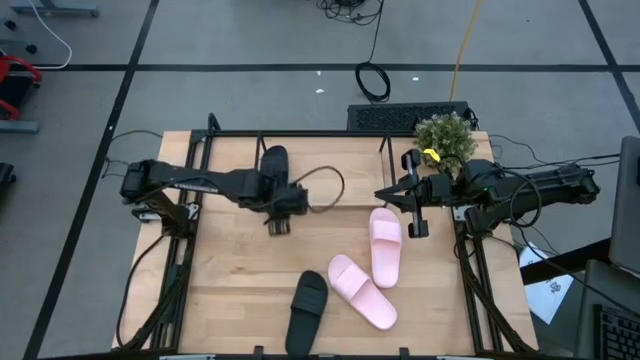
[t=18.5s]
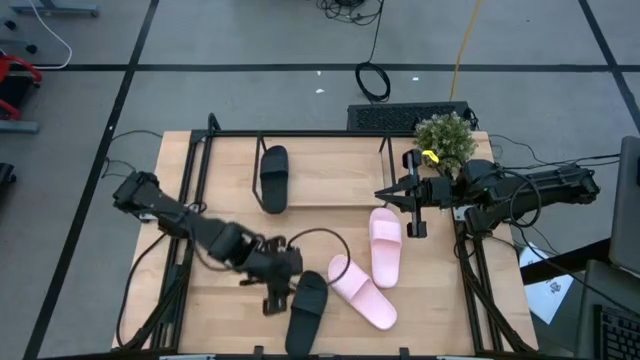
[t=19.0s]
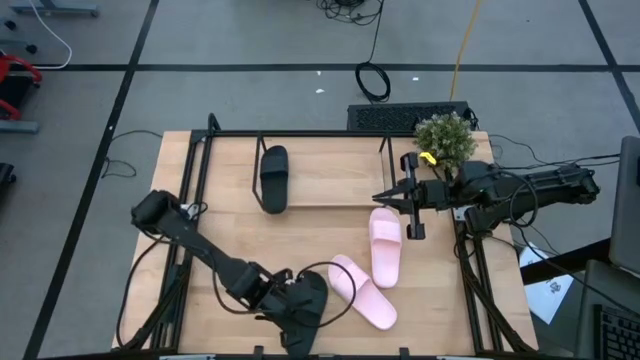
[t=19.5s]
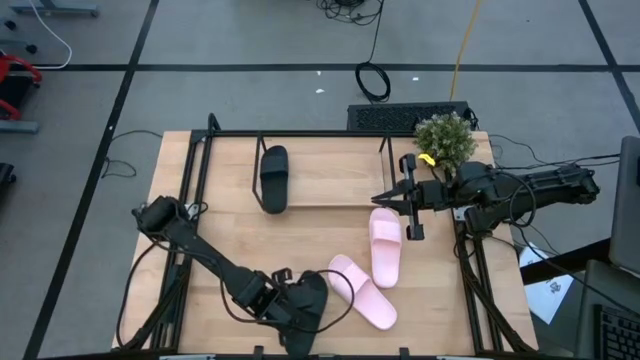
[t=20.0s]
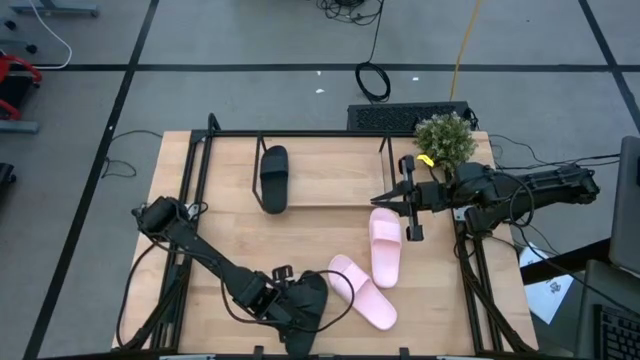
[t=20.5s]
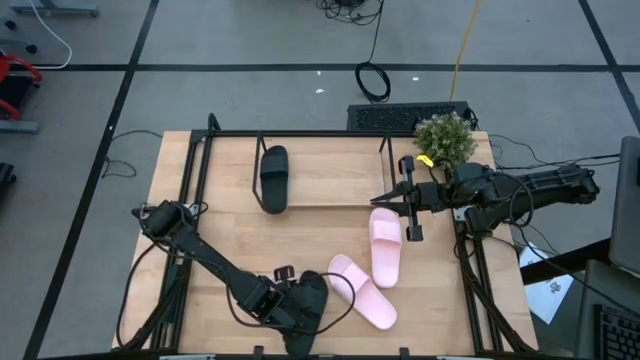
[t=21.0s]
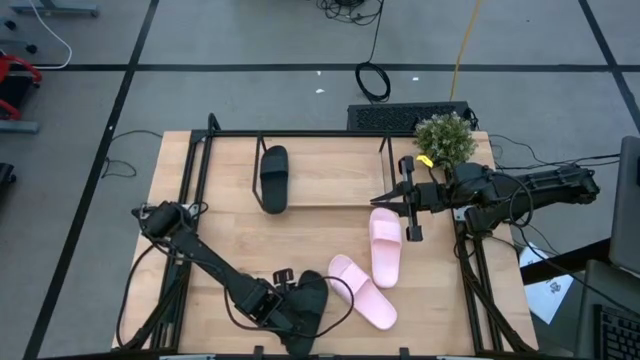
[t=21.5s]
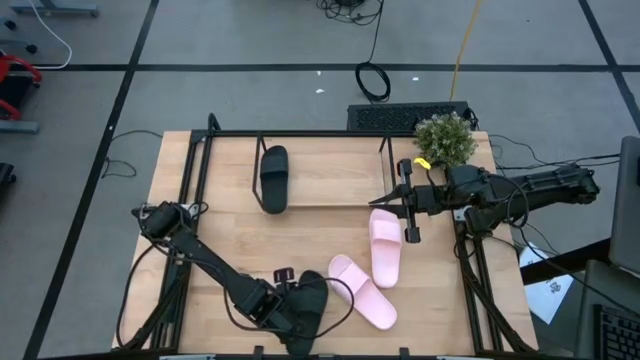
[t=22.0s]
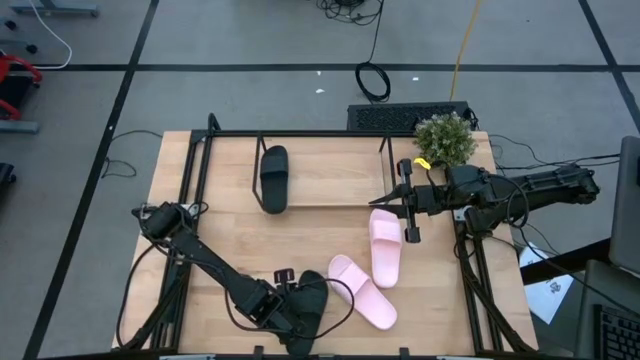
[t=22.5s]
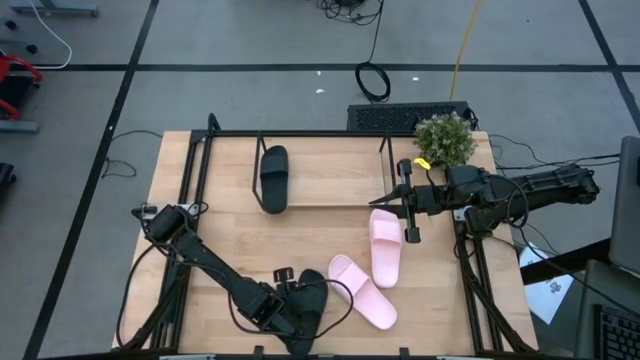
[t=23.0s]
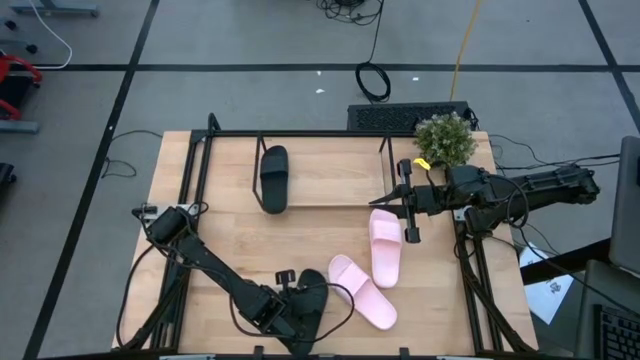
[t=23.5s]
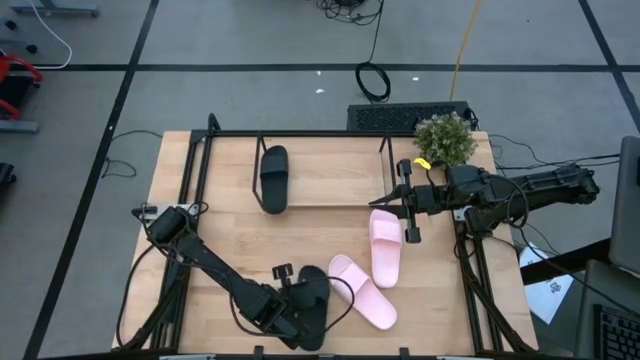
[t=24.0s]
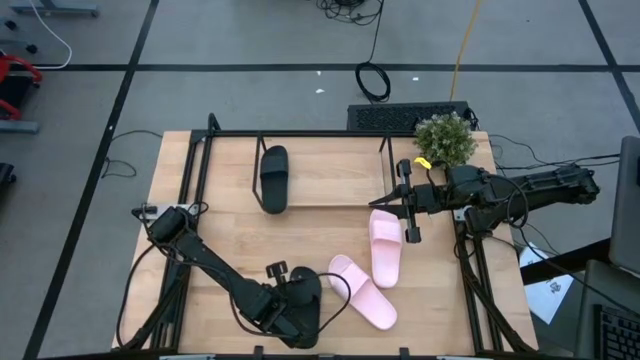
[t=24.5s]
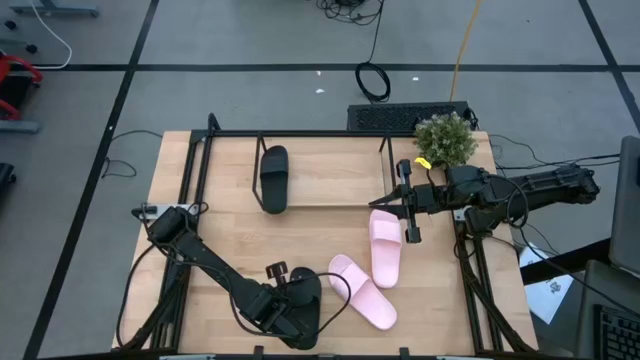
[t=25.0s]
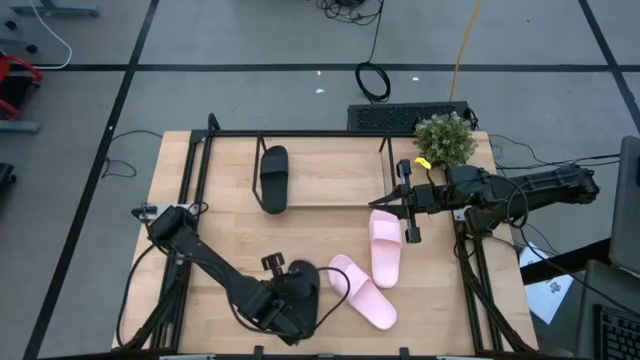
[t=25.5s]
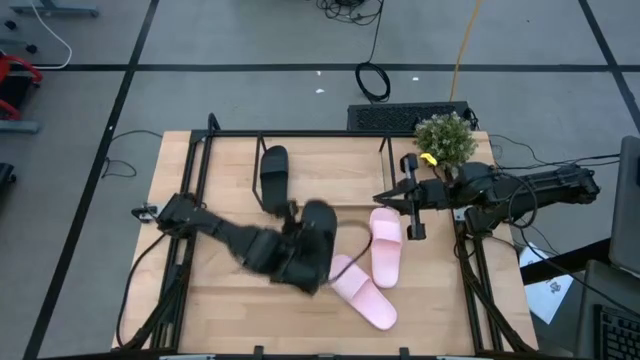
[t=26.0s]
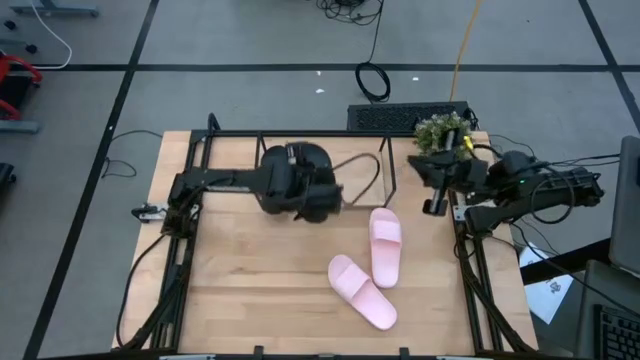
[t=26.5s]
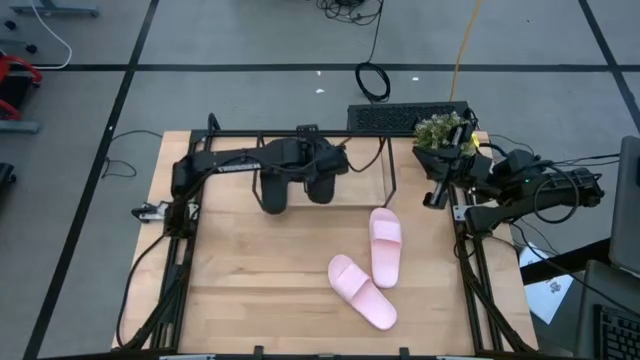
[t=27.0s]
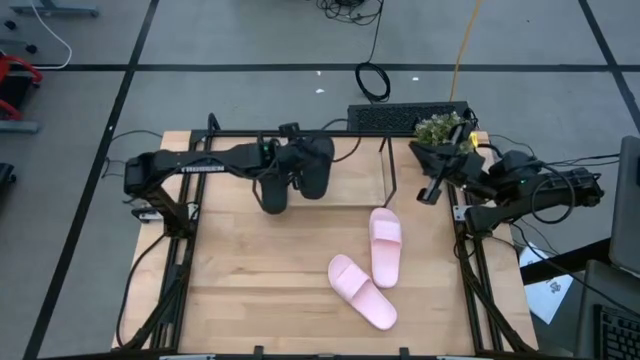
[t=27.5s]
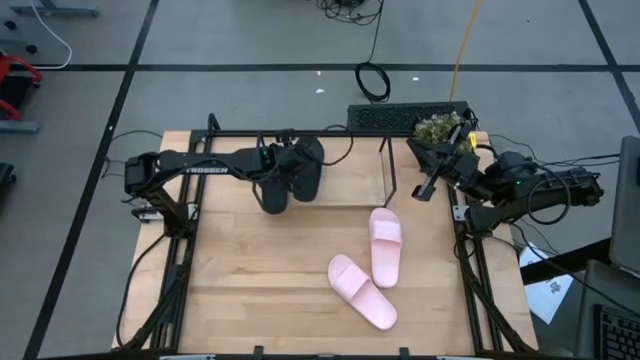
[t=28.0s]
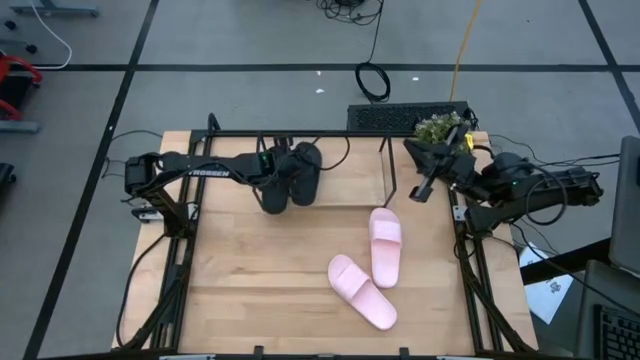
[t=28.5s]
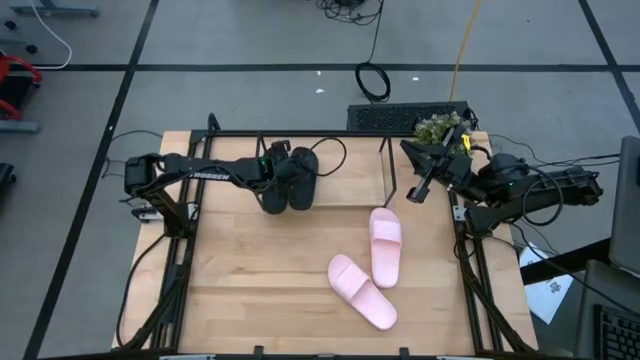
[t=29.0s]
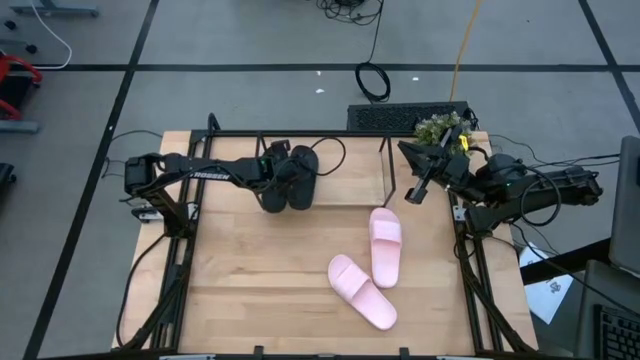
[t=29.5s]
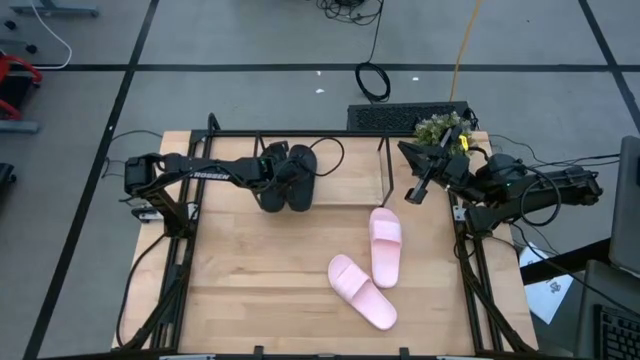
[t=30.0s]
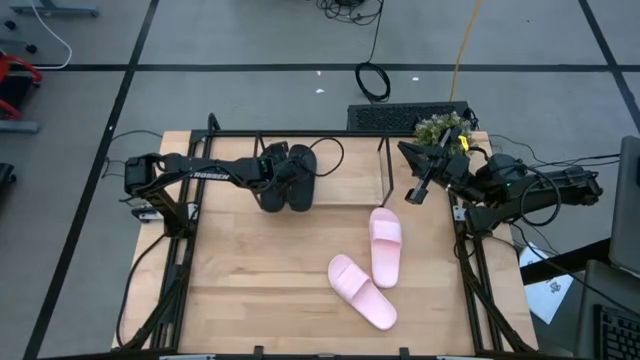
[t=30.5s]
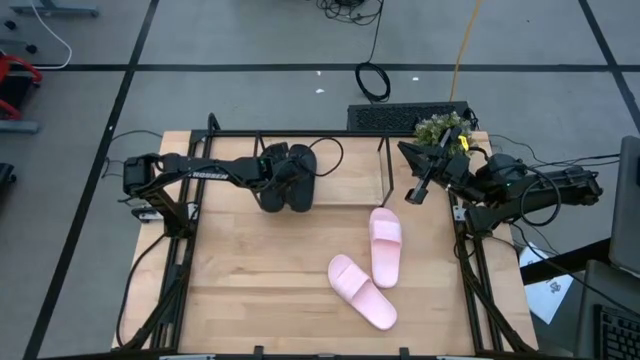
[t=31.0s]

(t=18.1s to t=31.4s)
Task: Pick and place slides into the shelf
Put the black slipper on the shelf

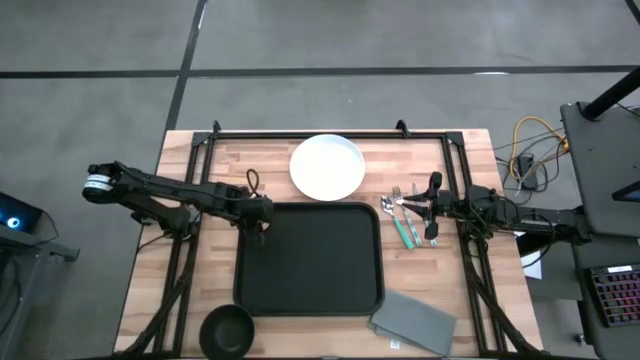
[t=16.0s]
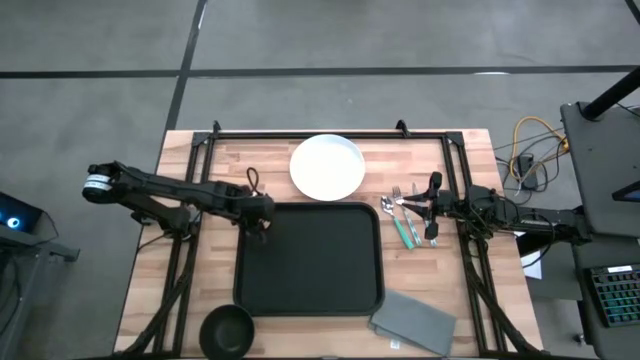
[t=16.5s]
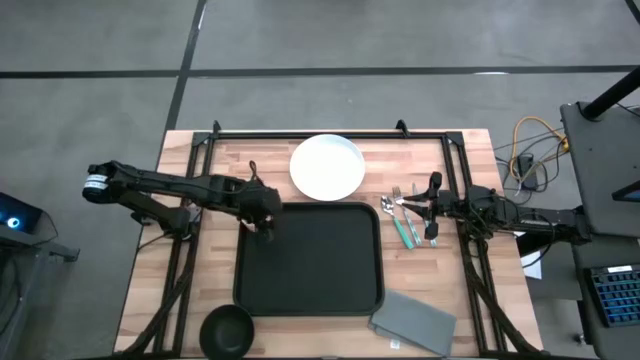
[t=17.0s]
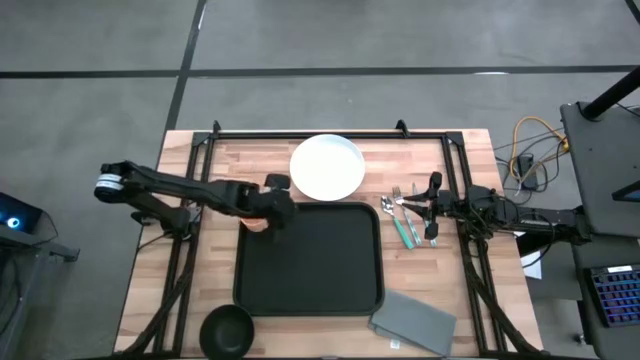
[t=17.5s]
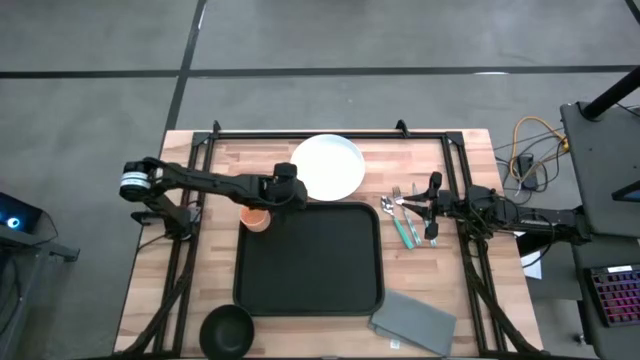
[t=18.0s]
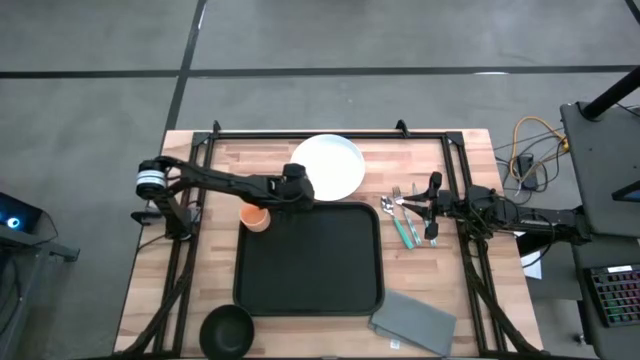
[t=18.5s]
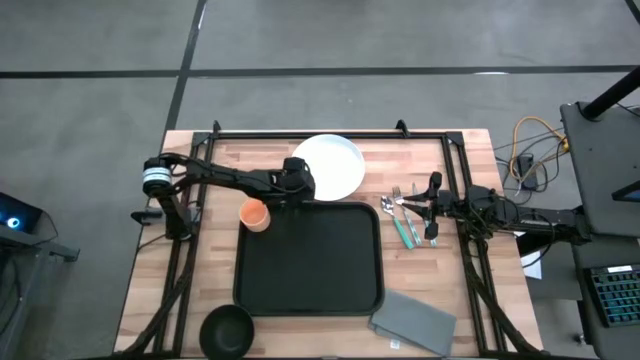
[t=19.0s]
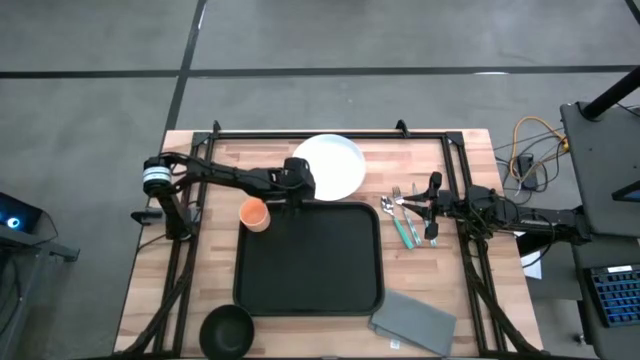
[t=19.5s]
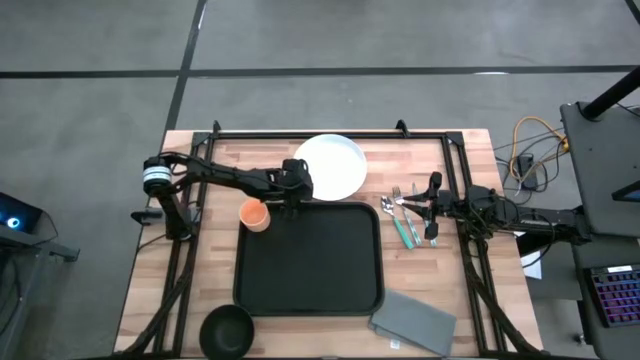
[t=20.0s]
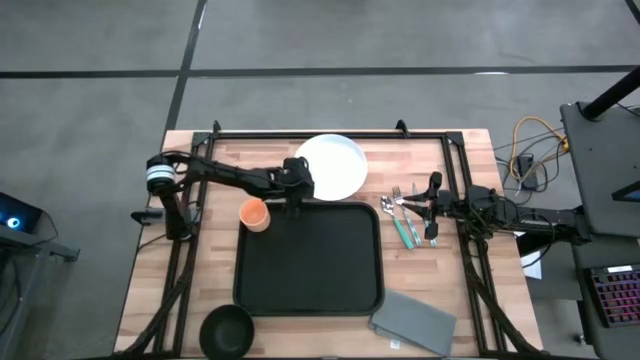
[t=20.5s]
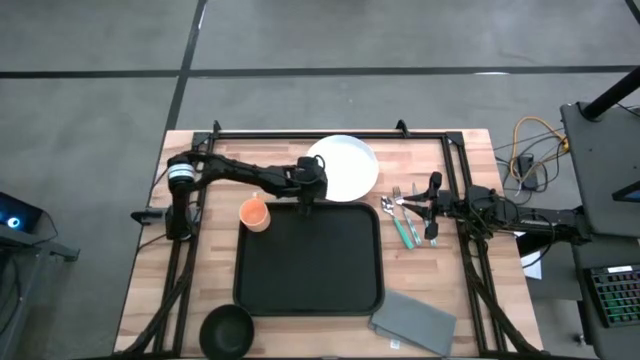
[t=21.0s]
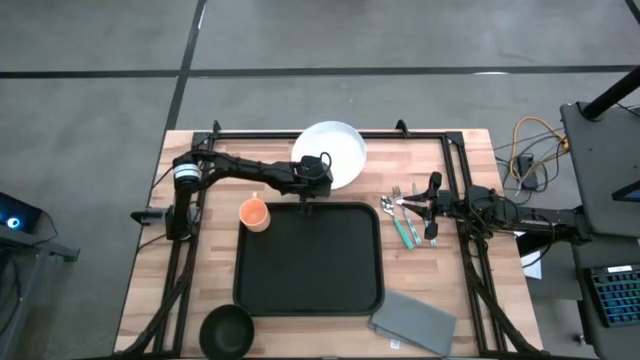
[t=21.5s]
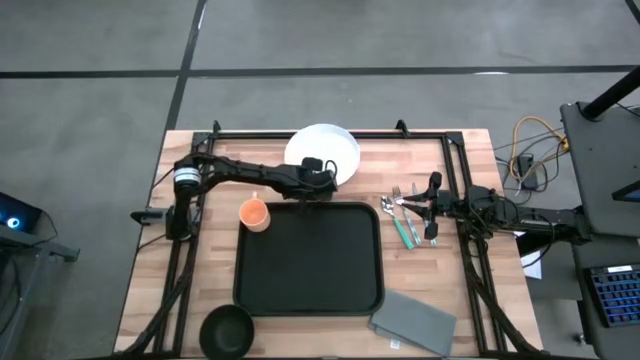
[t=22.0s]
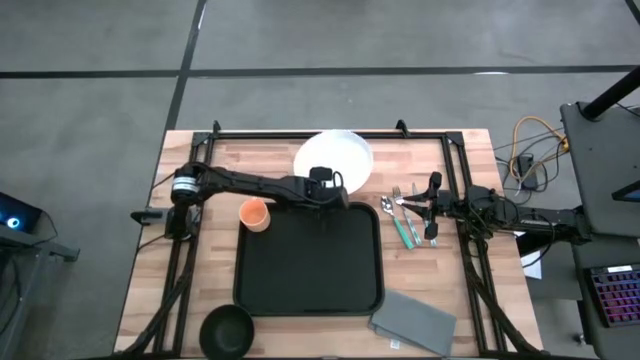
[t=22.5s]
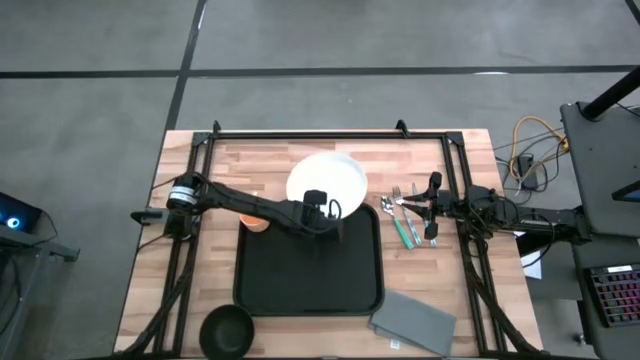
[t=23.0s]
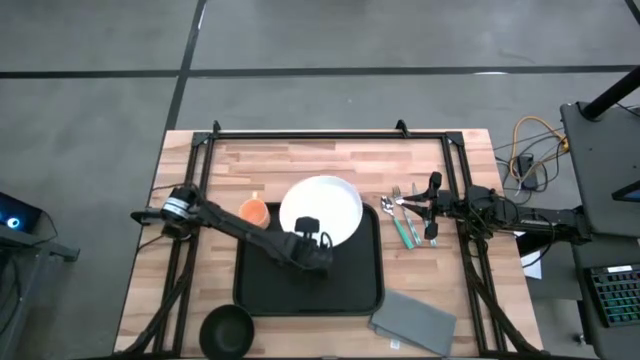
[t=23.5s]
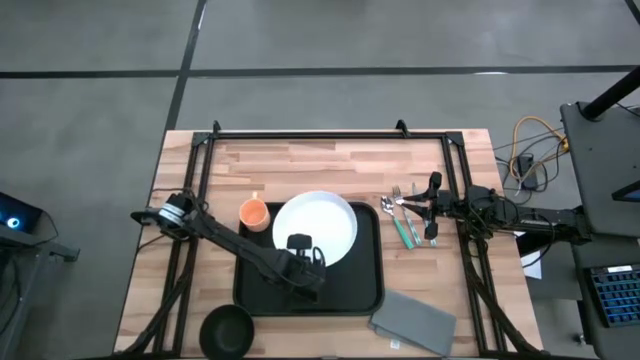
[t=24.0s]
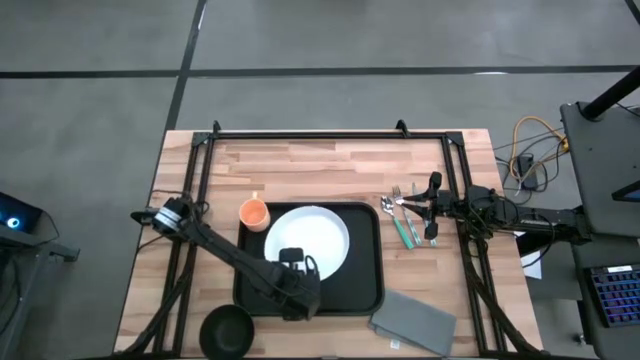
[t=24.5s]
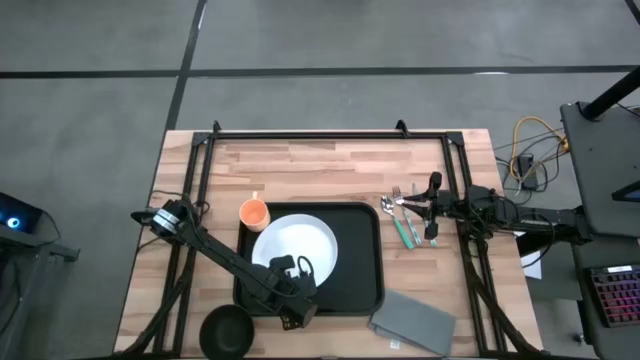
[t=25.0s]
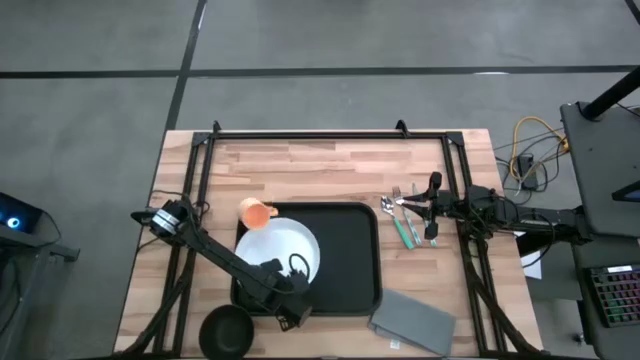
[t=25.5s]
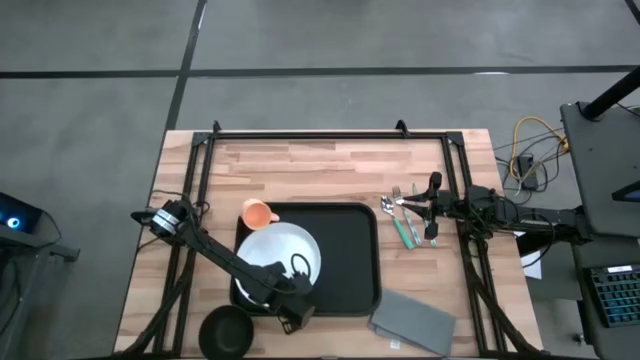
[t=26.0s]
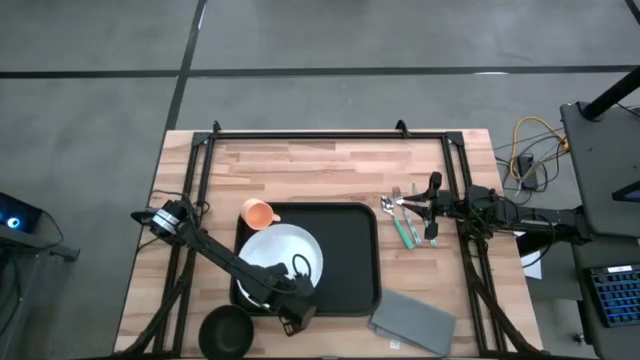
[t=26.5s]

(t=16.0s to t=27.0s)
Task: Set up tray
Put the white plate to the bottom of the orange mug on the black tray
